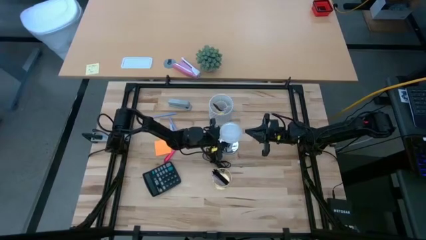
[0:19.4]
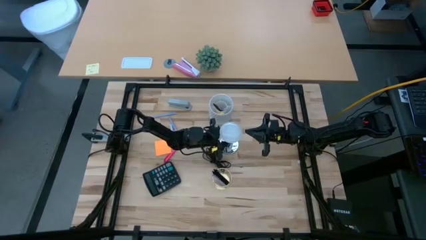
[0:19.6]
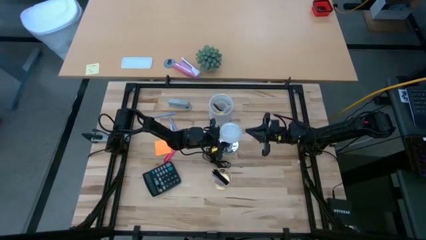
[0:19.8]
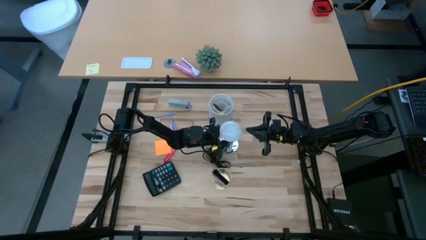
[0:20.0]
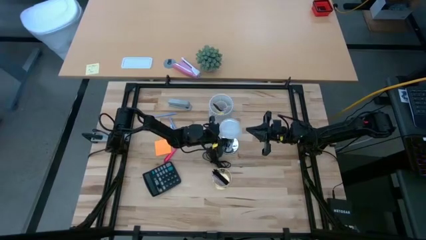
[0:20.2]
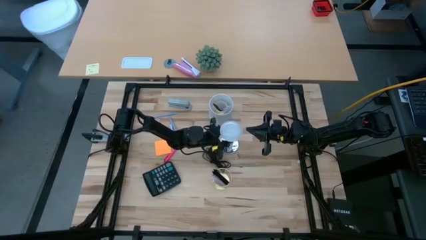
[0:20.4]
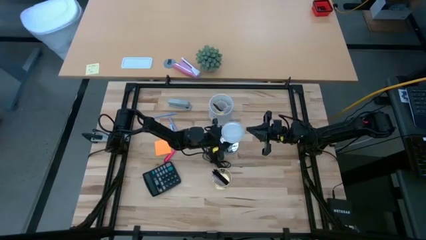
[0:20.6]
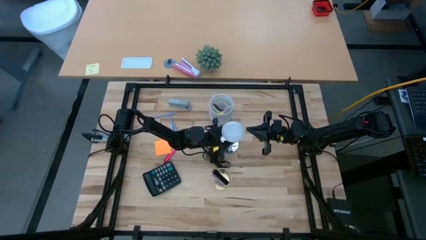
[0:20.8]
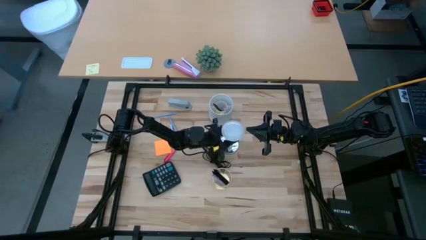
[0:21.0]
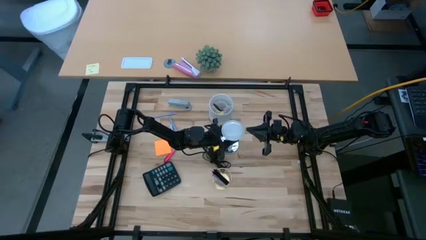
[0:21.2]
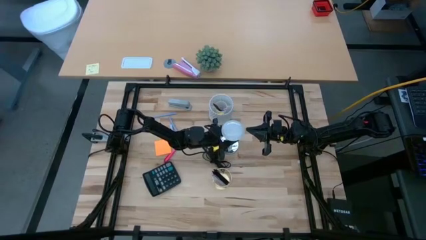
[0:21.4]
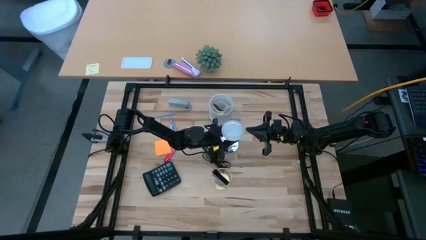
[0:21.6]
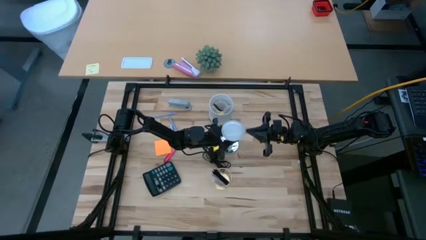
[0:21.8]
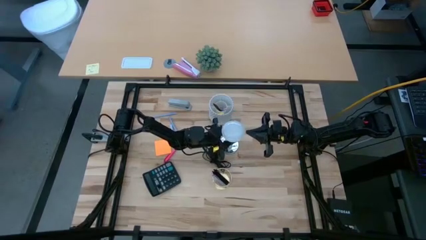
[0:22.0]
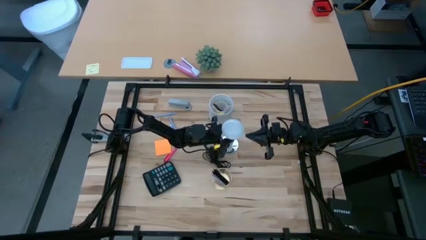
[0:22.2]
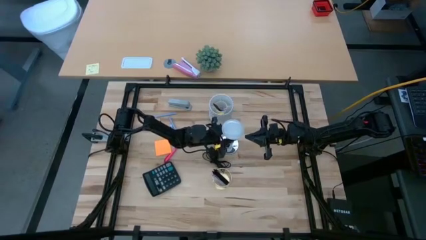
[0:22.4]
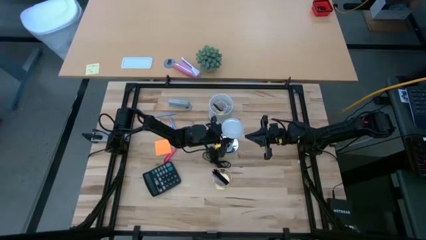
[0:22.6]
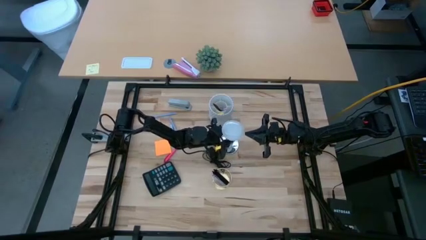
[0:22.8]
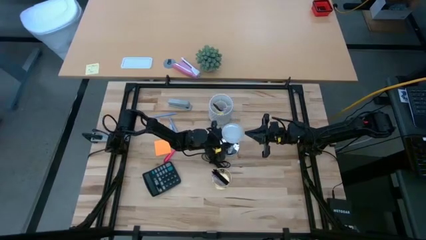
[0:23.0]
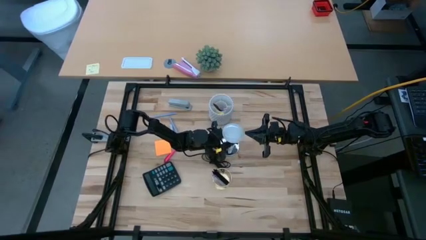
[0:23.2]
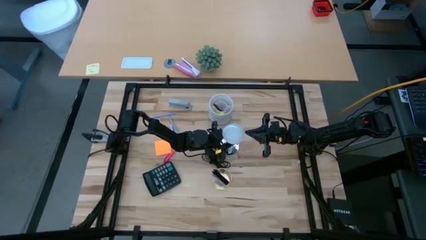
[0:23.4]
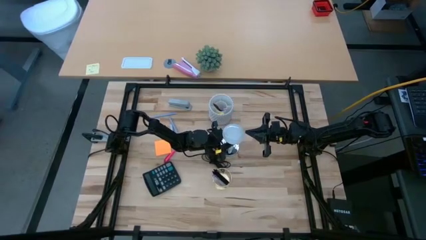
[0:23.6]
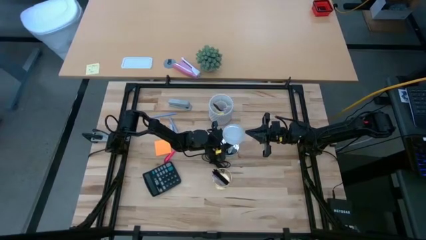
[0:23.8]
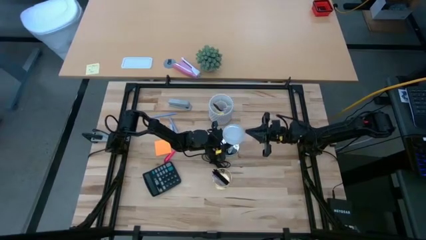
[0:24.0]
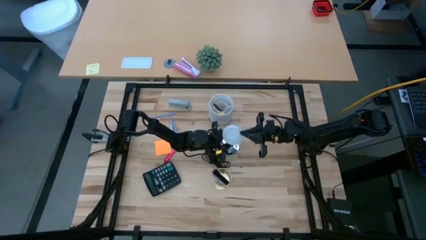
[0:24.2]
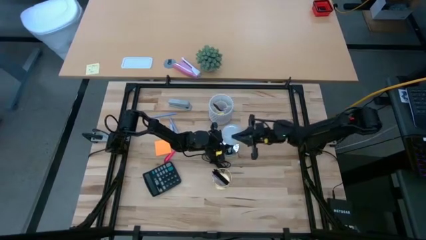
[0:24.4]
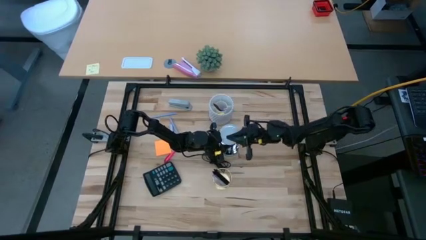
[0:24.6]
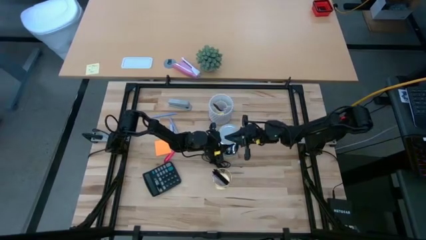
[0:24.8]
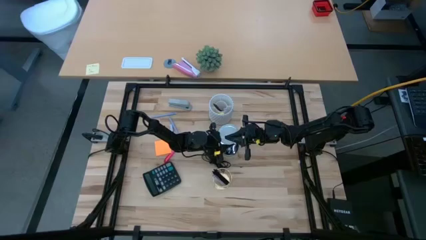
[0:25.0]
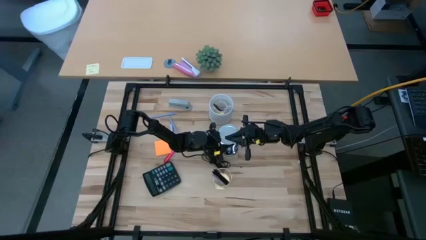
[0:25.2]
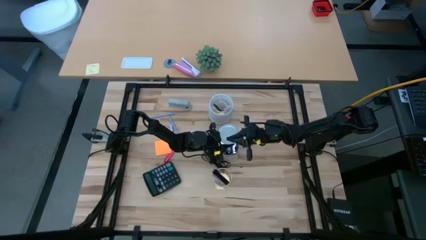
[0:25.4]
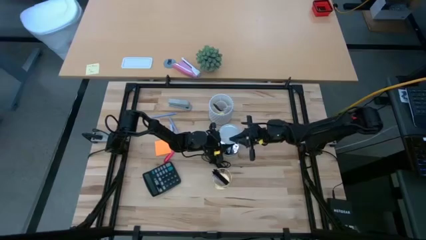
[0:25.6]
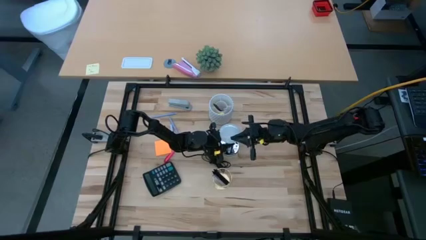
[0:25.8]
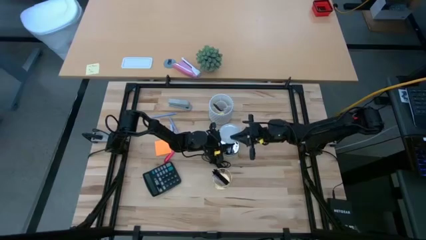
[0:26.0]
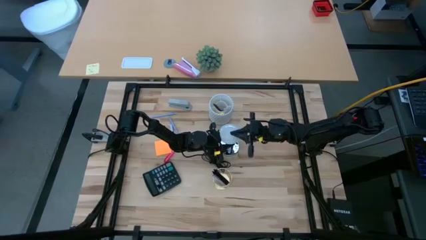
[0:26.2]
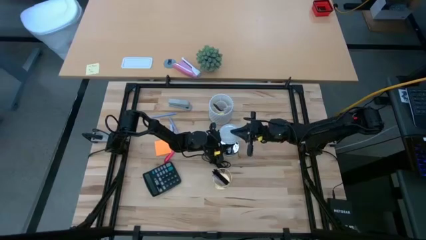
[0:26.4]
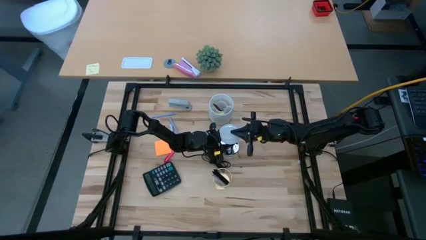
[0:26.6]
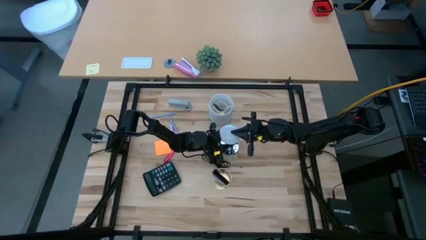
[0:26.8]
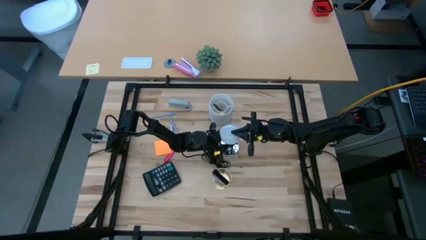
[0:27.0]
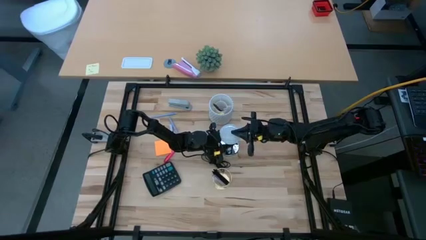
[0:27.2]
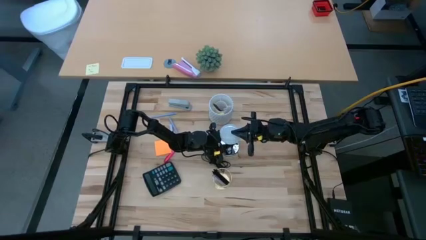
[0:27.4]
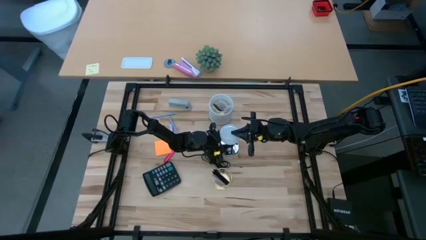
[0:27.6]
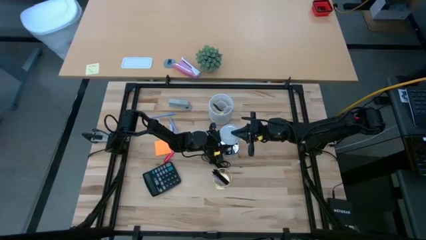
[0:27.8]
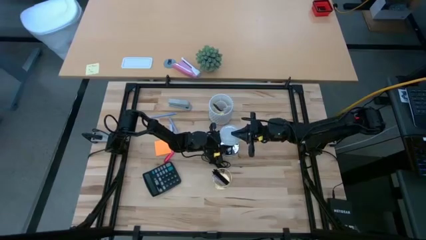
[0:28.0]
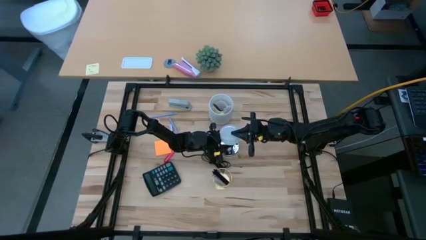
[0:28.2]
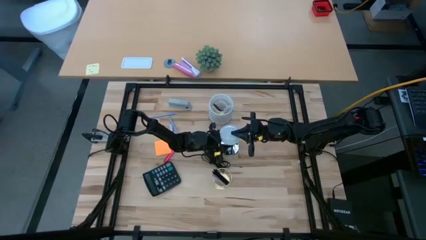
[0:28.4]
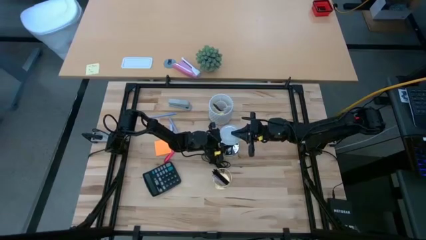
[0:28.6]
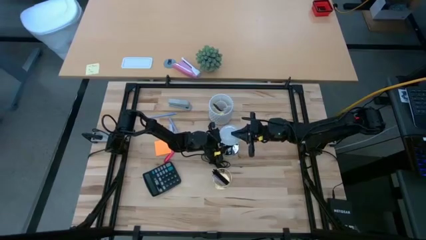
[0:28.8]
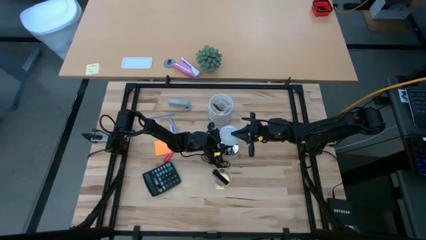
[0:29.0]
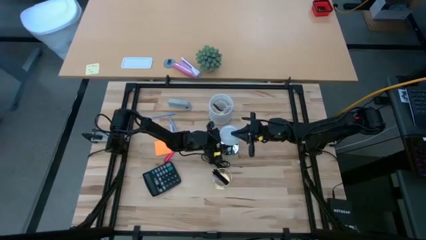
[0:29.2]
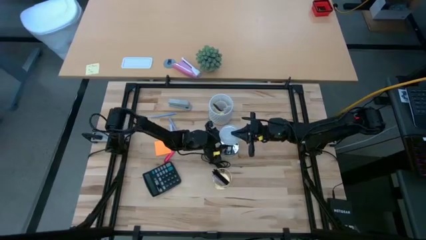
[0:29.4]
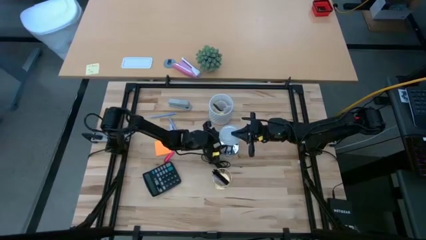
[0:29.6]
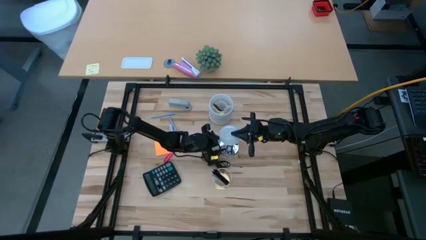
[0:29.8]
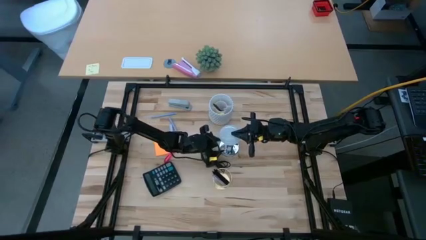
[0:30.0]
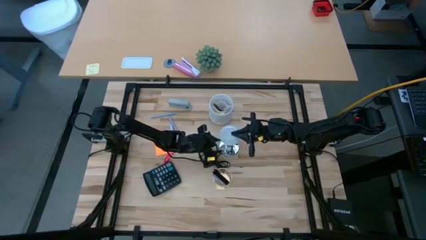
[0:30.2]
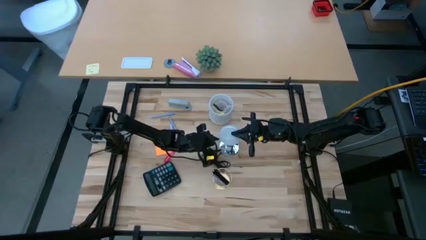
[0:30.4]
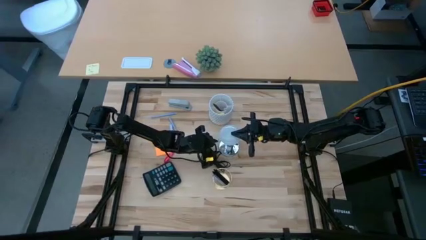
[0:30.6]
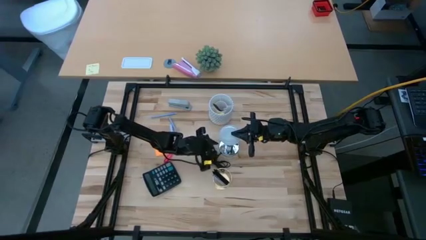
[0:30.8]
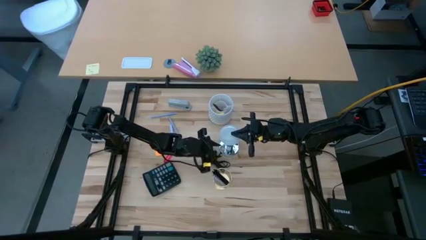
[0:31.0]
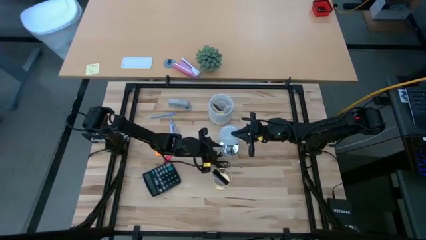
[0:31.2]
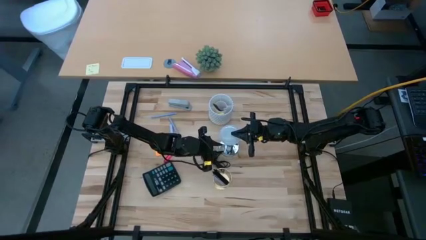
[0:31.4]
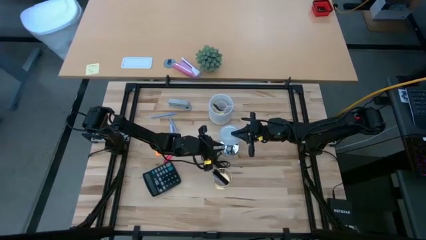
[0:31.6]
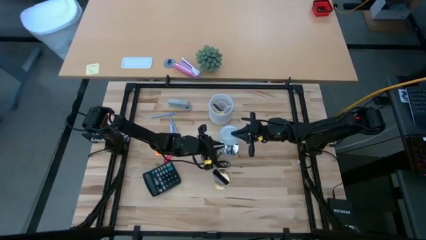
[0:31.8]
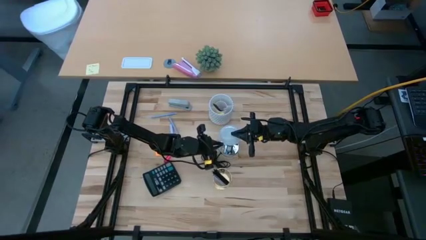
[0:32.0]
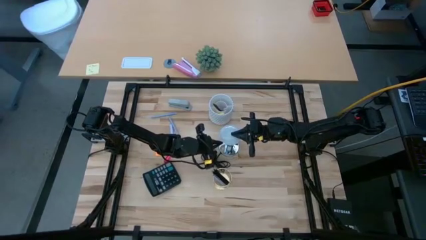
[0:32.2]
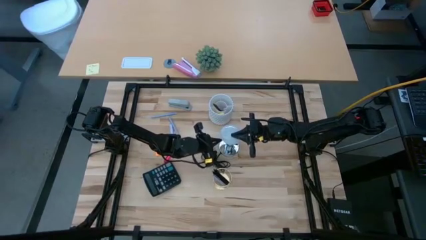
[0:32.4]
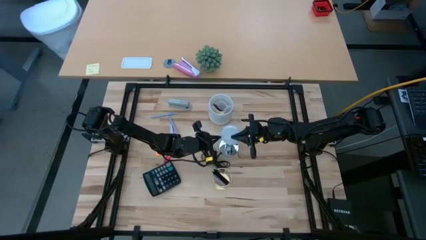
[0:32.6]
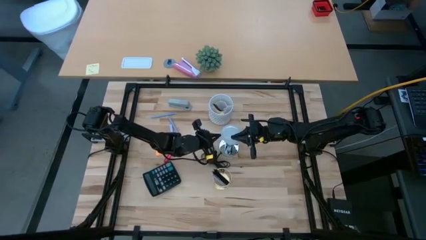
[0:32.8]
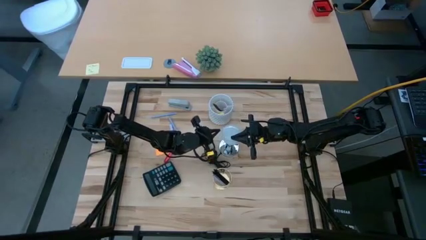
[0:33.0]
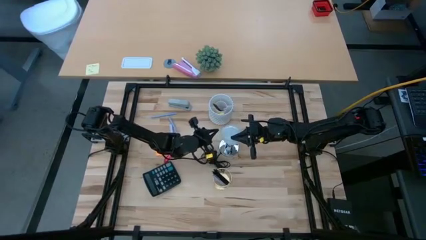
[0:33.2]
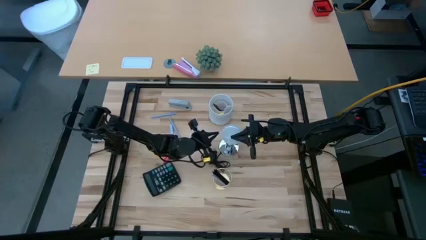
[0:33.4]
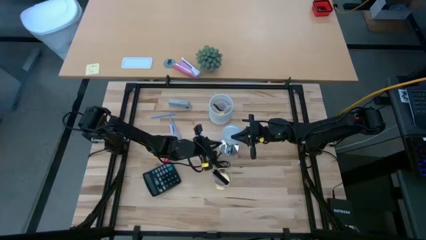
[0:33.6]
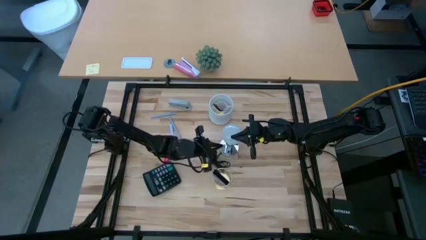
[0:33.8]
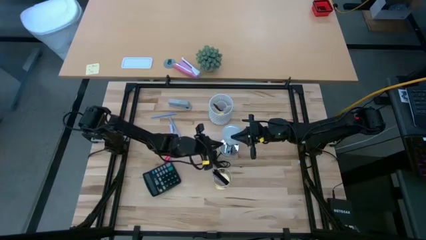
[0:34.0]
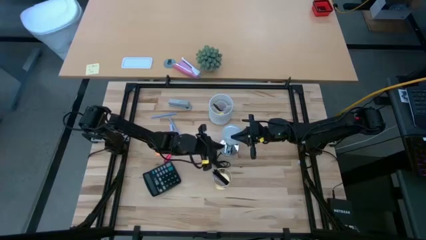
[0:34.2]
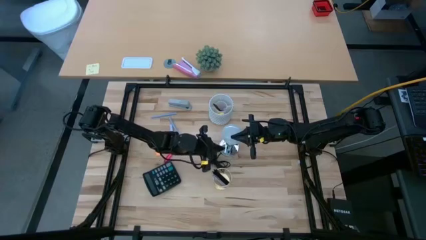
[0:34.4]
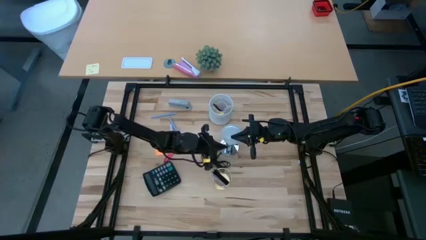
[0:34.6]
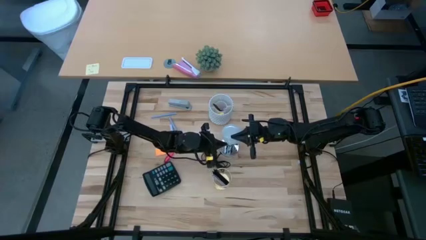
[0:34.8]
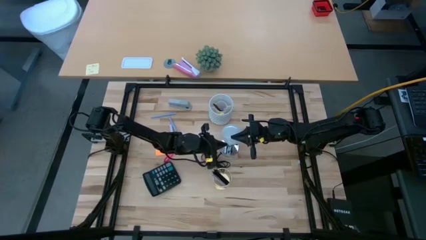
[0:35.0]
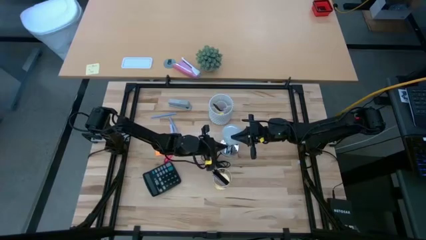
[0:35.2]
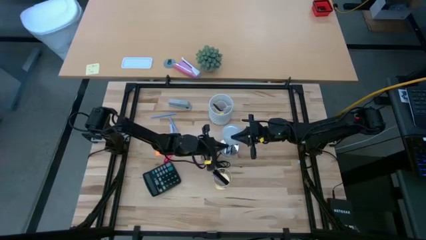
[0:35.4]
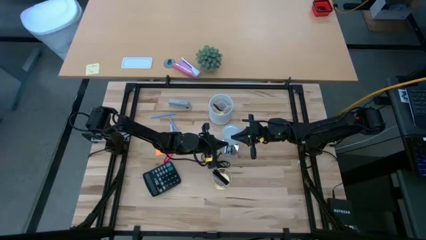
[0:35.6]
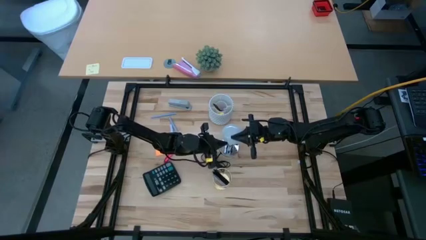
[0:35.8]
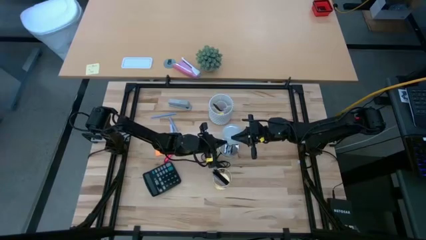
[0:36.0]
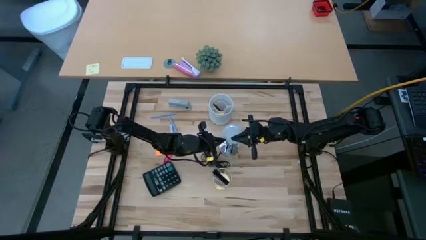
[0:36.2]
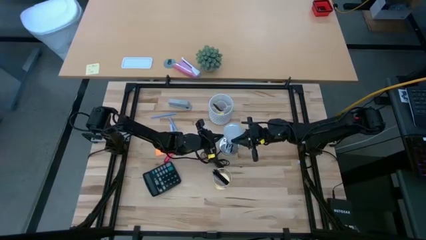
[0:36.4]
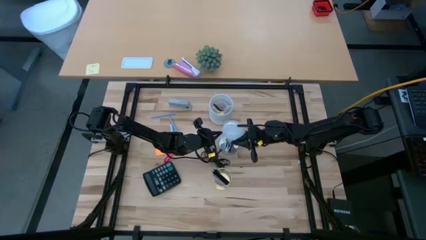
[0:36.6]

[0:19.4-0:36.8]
Task: Screw lightbulb
Insert the lightbulb into the lamp
